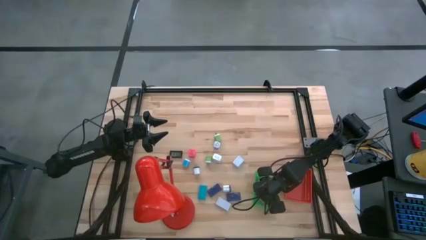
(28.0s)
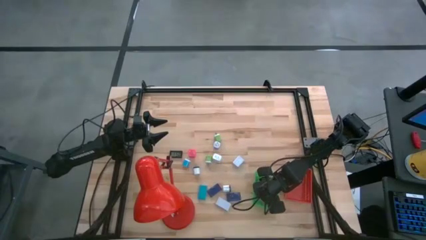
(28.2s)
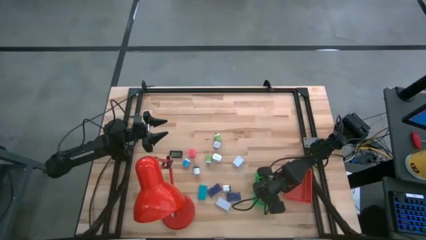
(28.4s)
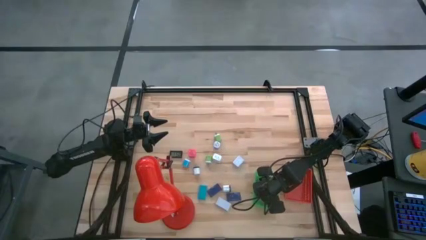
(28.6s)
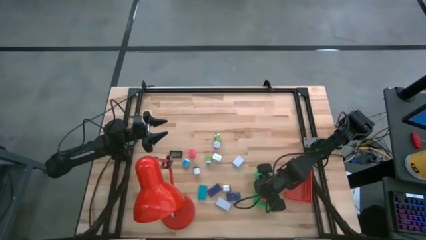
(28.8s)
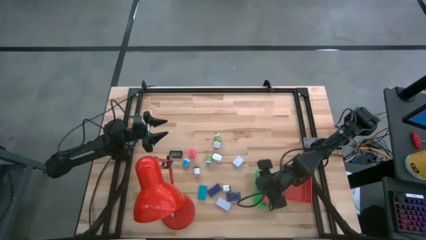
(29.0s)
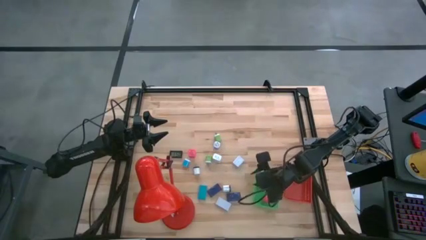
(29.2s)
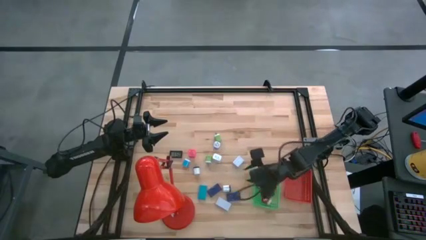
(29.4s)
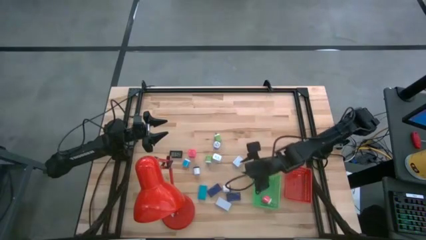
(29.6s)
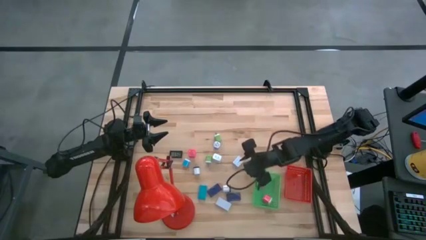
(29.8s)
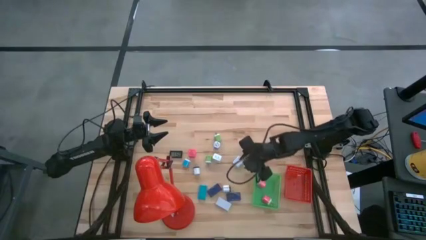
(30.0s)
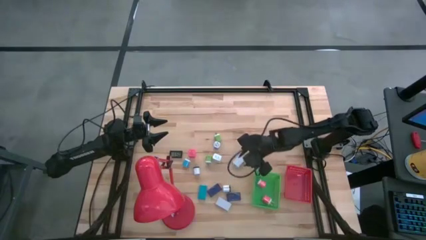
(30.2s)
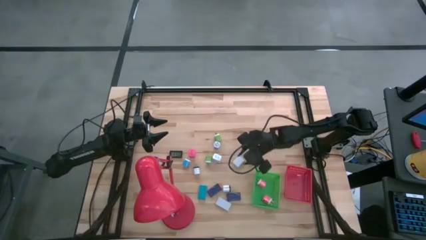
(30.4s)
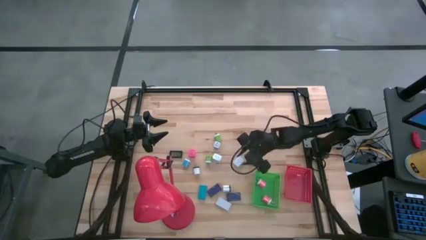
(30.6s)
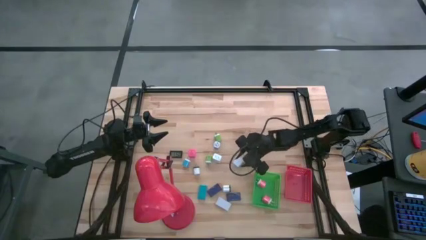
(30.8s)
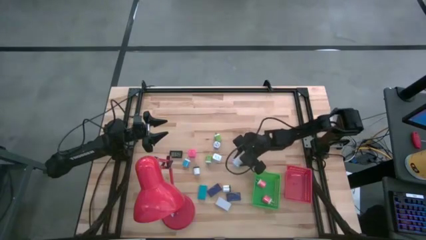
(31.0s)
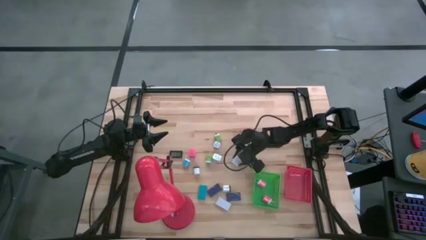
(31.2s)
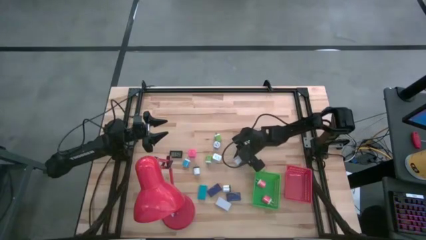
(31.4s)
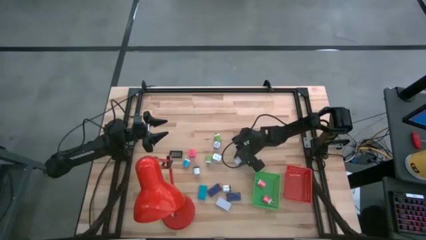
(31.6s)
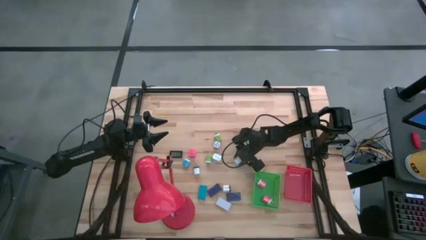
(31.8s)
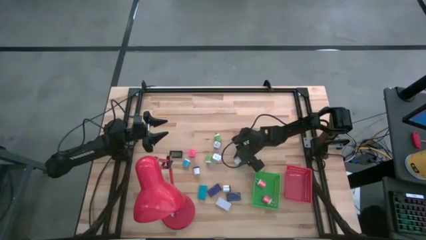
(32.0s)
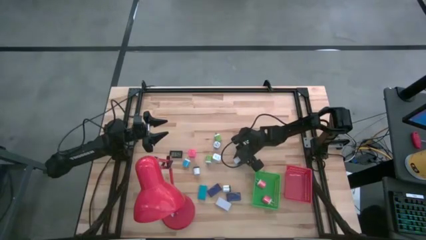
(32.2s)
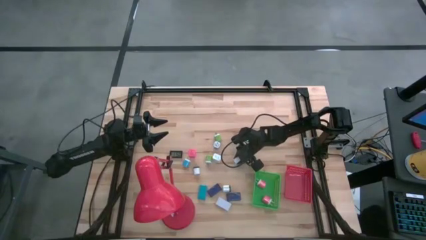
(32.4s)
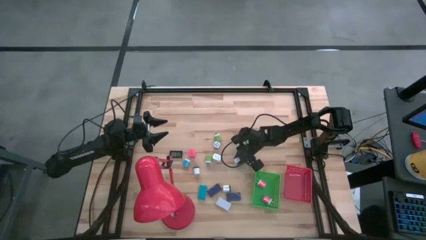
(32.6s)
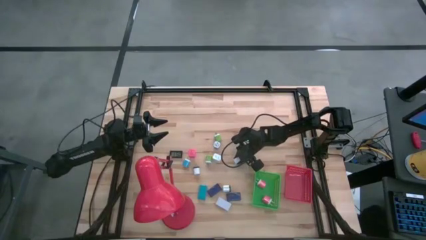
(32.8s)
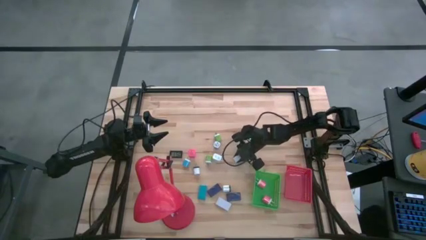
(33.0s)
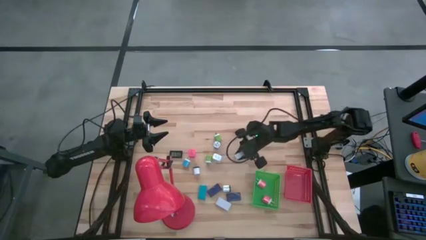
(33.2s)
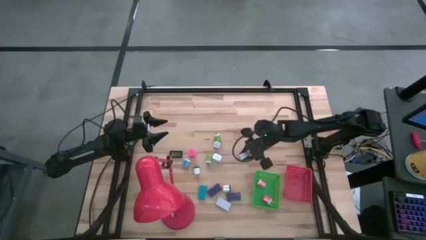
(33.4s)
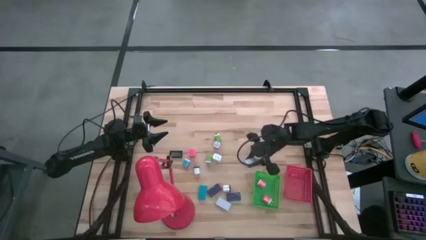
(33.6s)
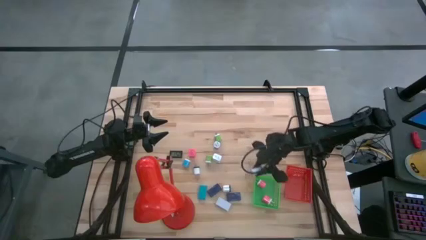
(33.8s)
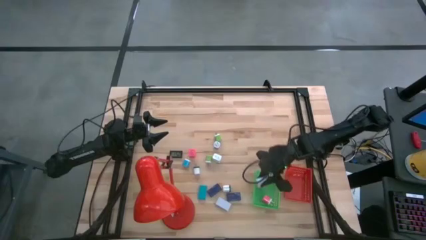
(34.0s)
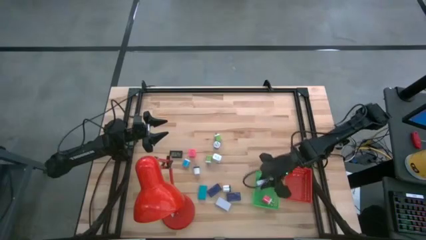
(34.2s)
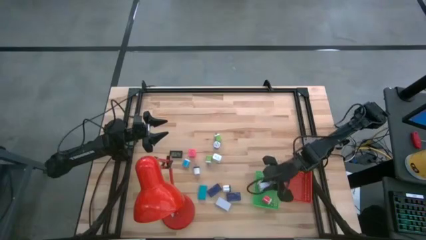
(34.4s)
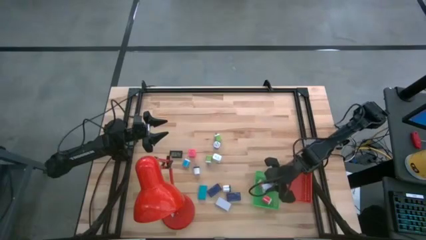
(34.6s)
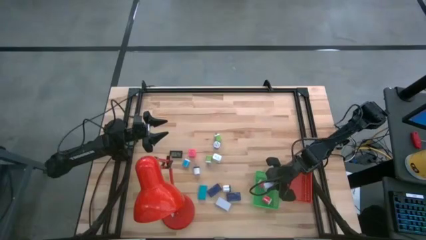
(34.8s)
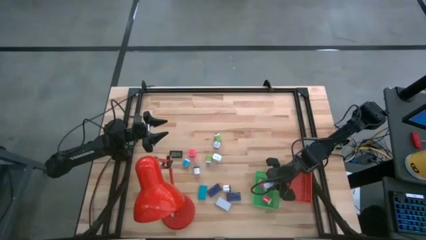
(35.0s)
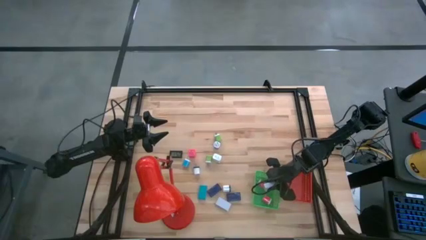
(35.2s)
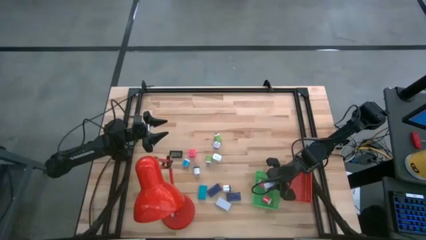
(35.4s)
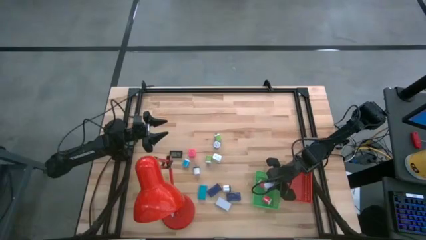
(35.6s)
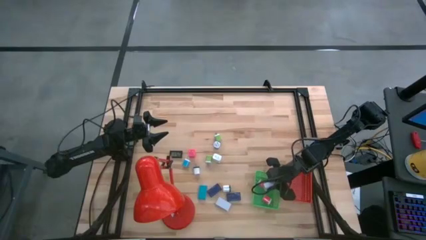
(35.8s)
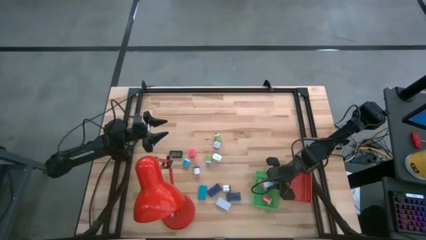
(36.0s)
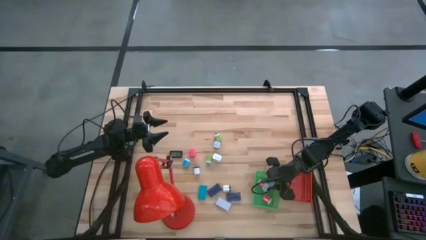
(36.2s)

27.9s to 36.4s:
Task: Pick & Place Office items
Put the right white charger adapter into the green basket

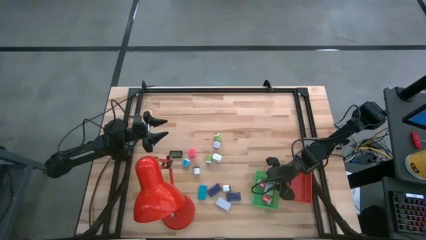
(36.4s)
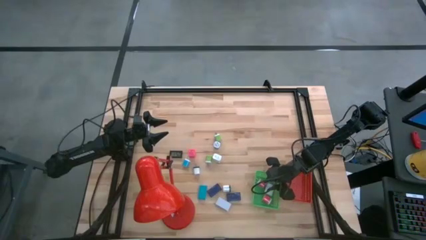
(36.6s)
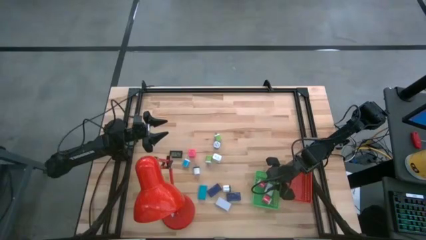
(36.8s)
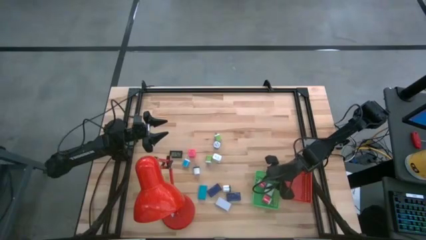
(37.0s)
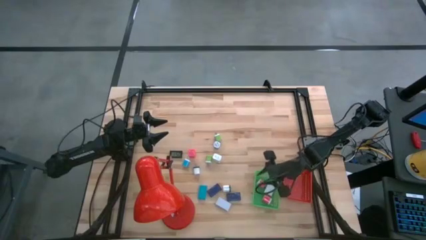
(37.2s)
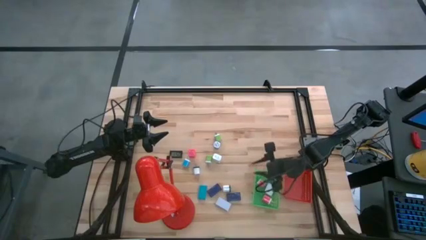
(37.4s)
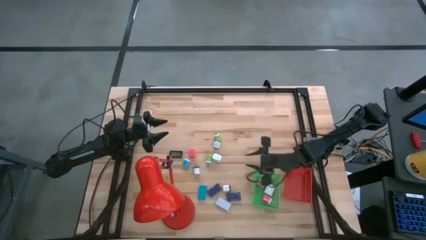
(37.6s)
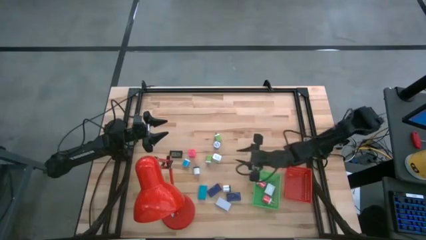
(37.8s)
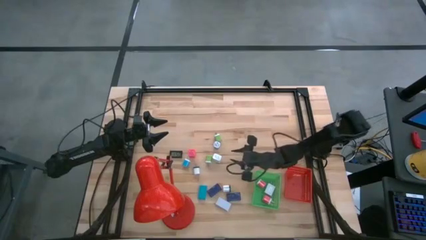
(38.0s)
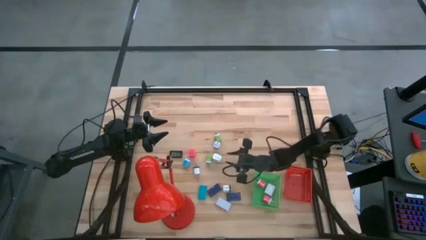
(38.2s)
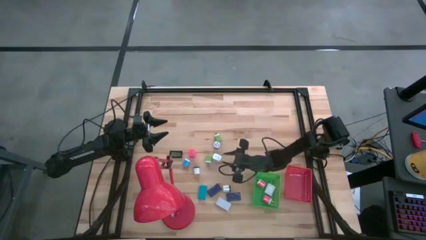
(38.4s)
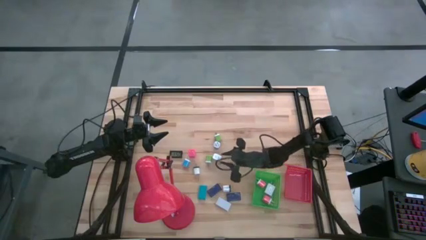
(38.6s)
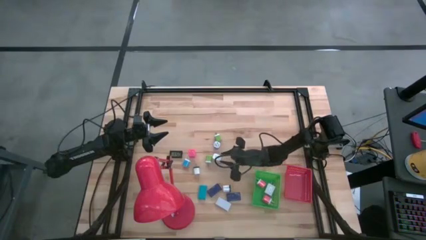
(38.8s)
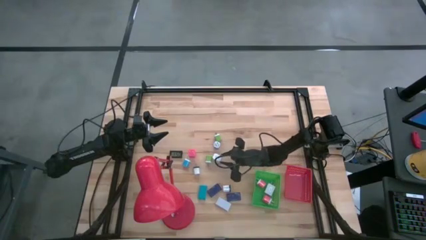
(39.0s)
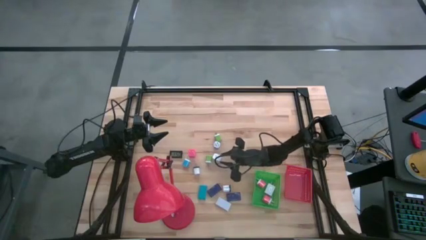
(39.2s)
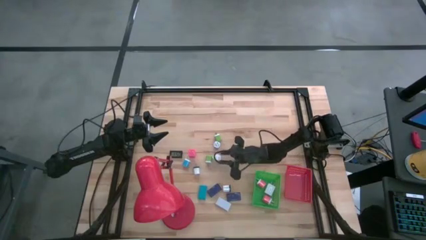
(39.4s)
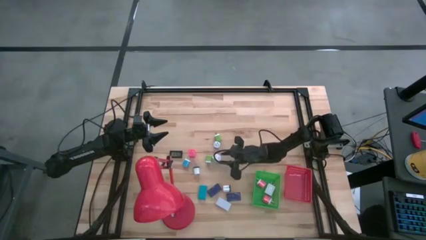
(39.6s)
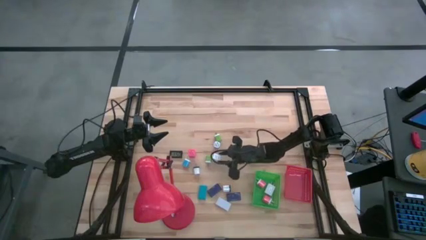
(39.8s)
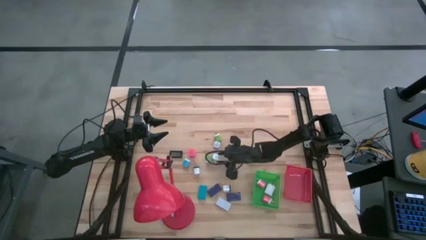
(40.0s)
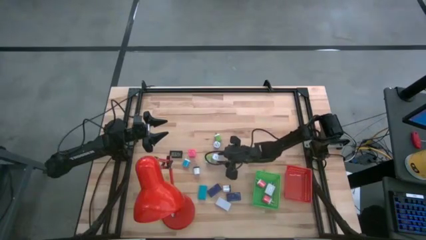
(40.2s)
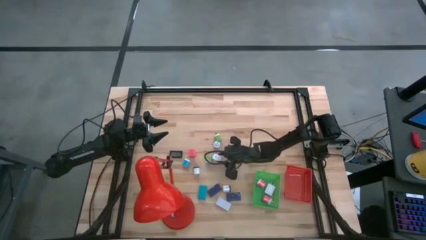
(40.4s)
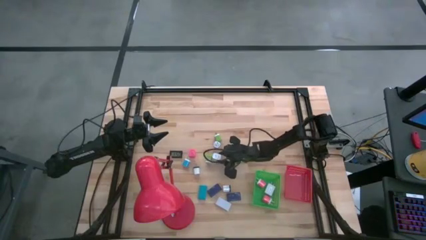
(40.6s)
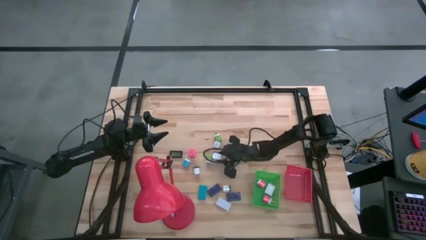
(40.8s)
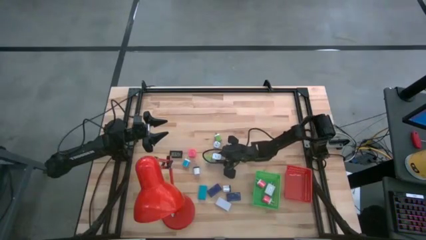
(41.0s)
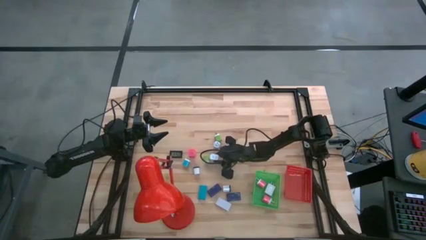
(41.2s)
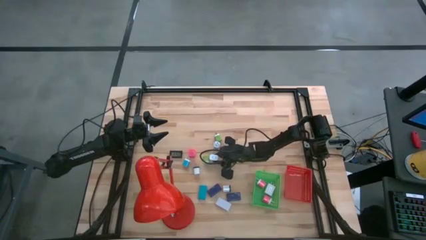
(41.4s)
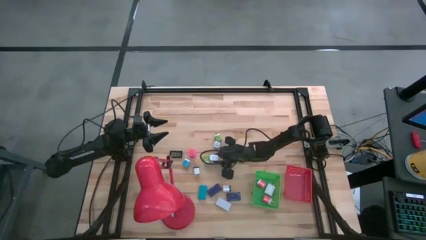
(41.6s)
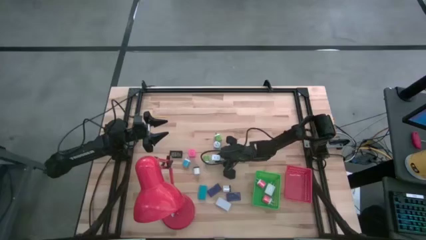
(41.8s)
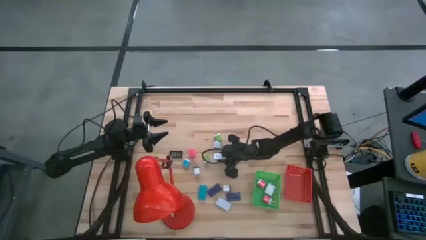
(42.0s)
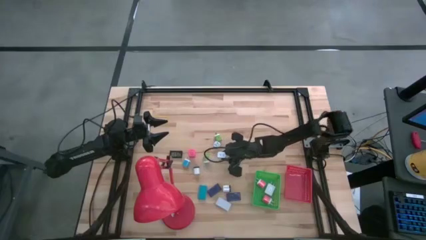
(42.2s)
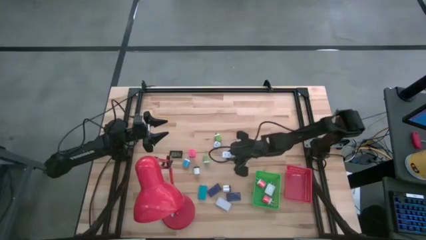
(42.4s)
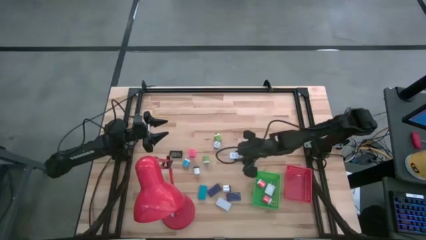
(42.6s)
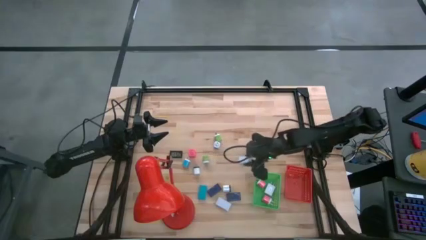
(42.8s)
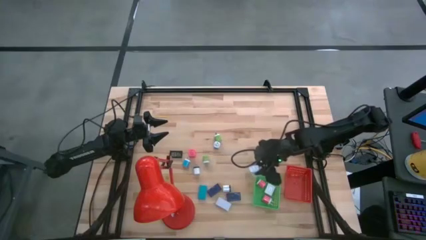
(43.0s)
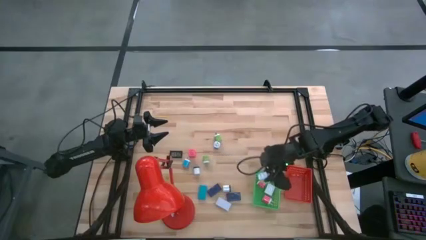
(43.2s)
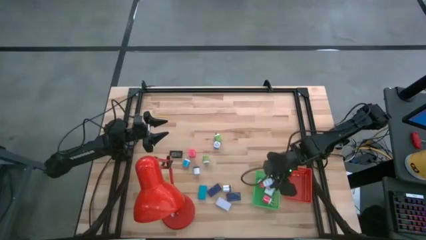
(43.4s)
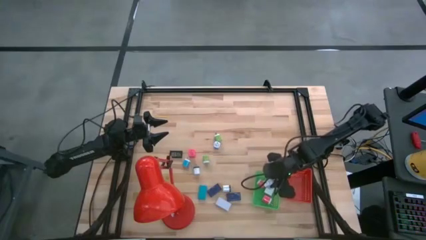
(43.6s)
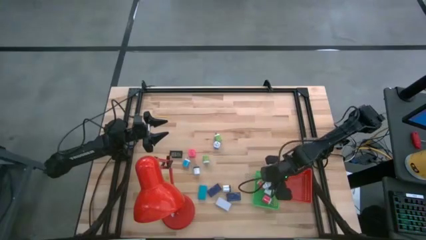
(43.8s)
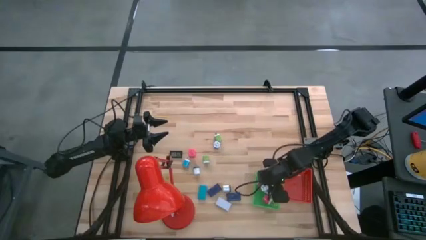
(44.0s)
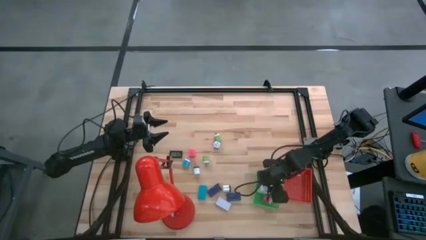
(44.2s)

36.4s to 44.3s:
Put the white charger adapter into the green basket
